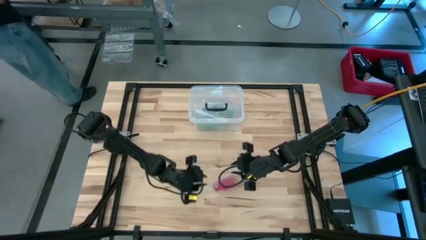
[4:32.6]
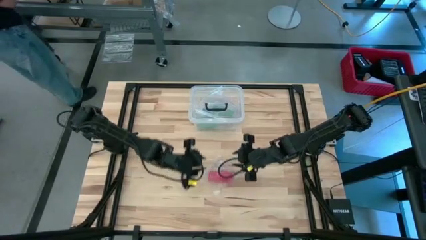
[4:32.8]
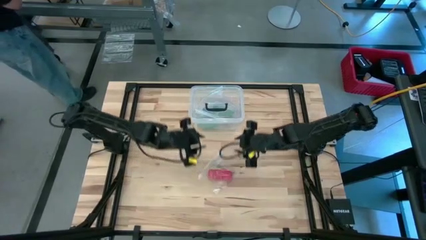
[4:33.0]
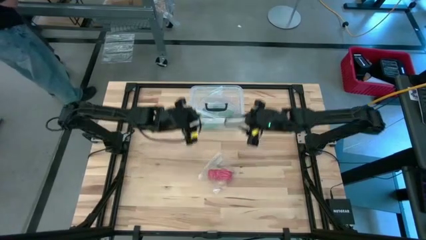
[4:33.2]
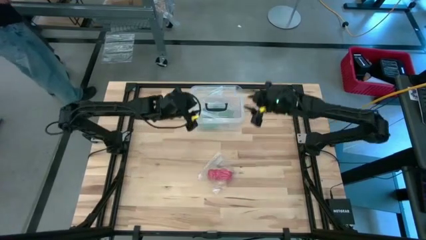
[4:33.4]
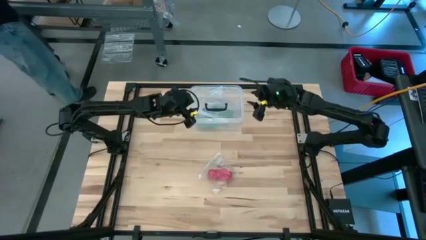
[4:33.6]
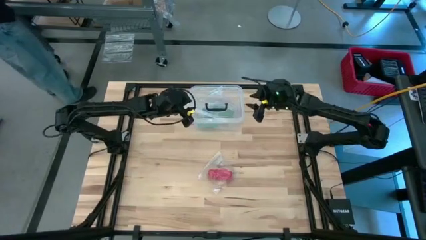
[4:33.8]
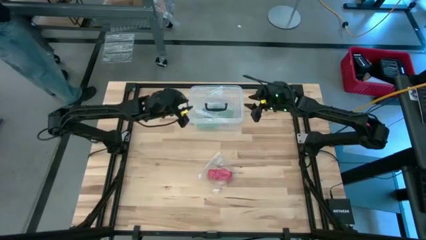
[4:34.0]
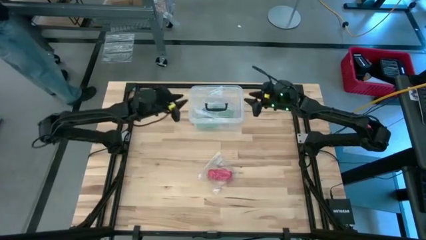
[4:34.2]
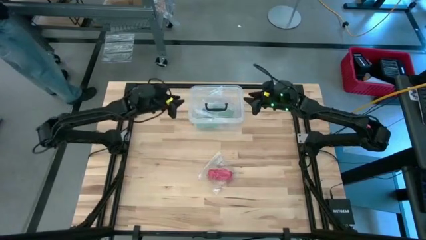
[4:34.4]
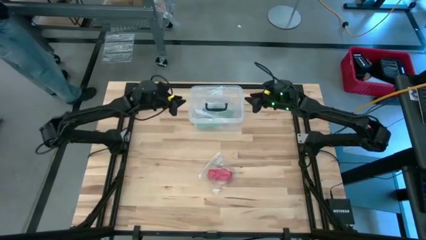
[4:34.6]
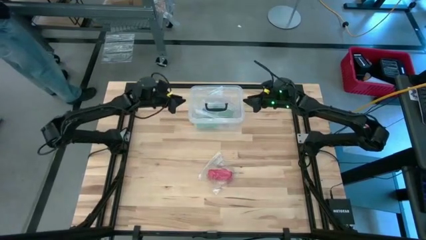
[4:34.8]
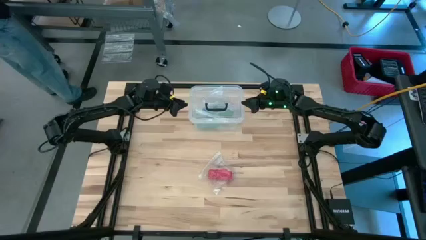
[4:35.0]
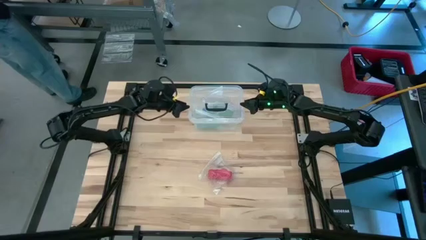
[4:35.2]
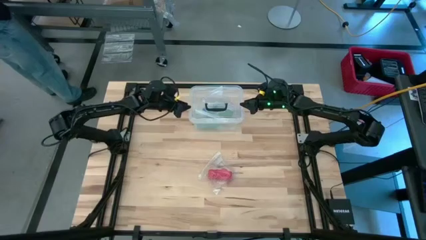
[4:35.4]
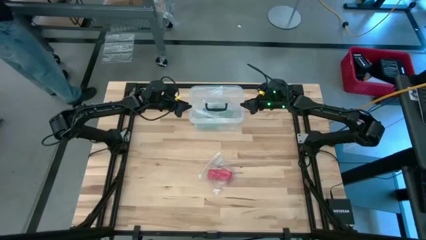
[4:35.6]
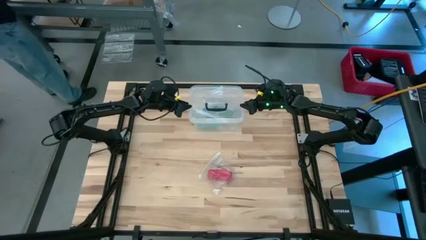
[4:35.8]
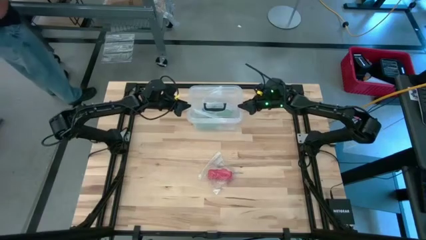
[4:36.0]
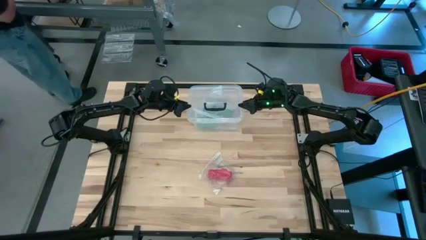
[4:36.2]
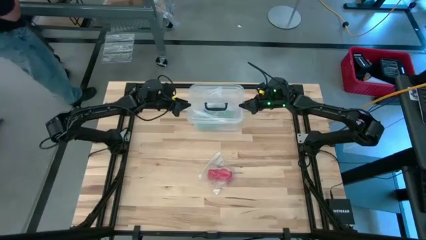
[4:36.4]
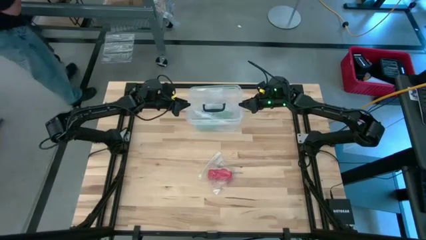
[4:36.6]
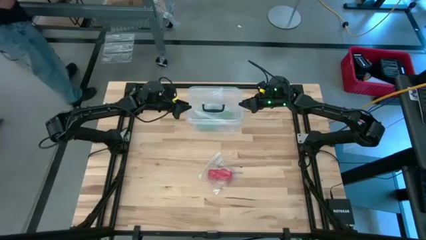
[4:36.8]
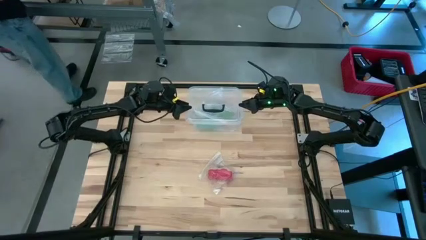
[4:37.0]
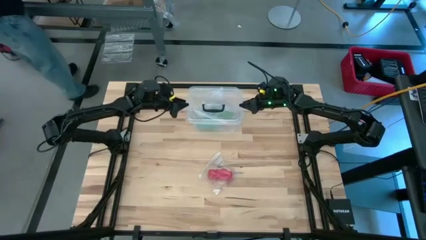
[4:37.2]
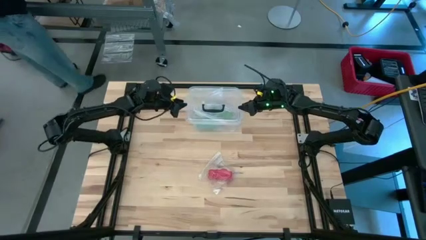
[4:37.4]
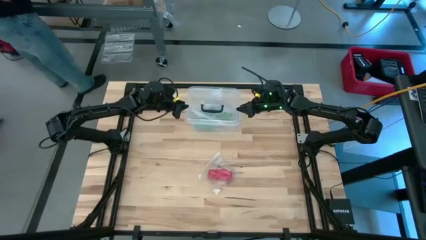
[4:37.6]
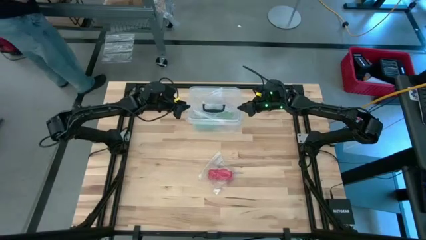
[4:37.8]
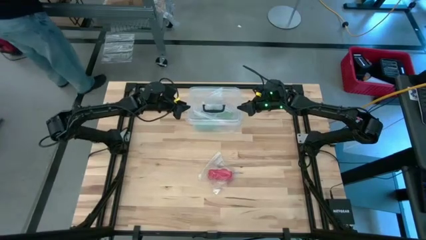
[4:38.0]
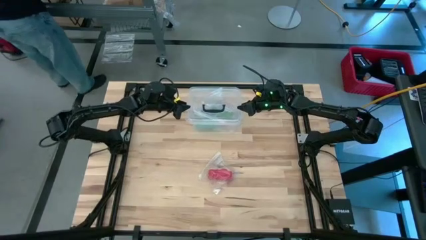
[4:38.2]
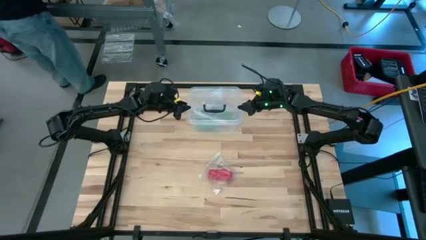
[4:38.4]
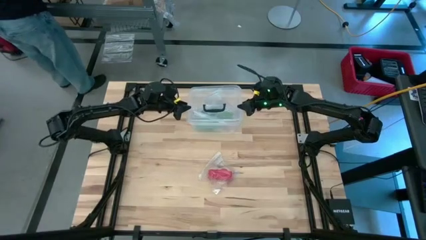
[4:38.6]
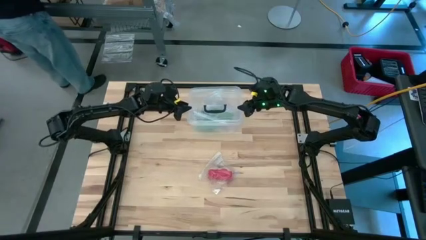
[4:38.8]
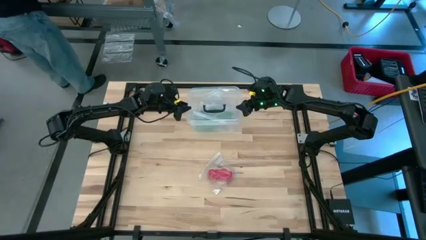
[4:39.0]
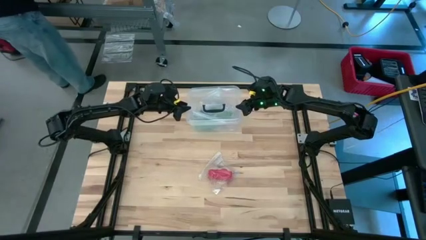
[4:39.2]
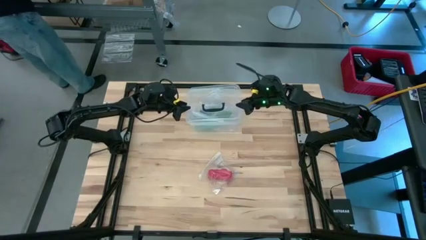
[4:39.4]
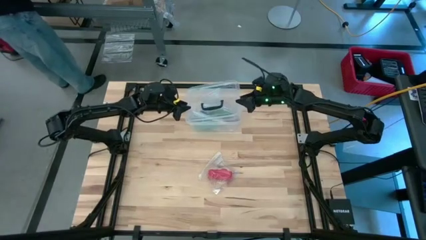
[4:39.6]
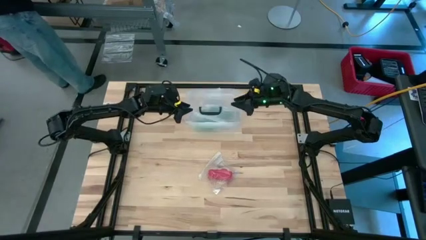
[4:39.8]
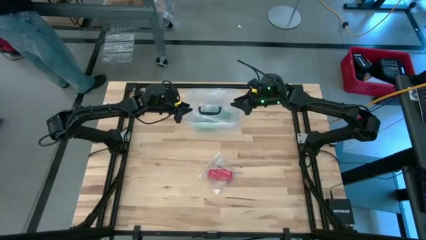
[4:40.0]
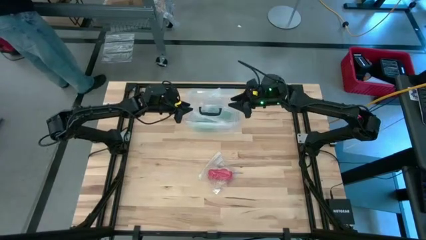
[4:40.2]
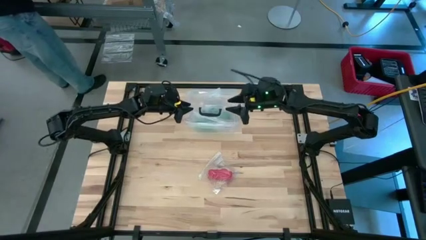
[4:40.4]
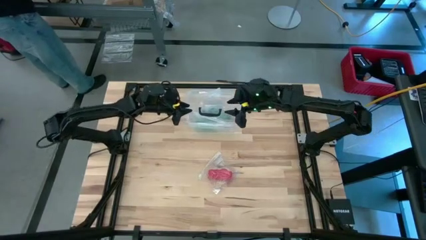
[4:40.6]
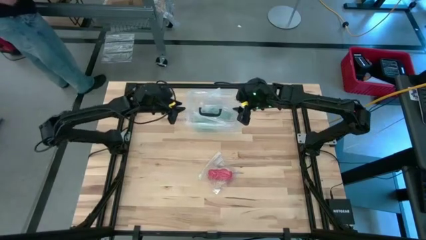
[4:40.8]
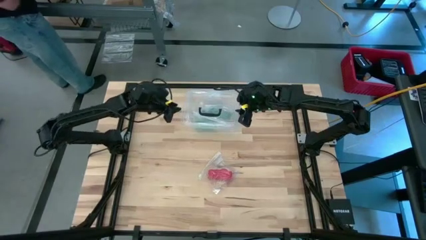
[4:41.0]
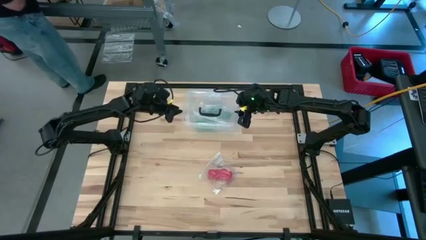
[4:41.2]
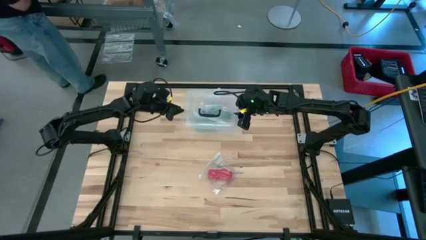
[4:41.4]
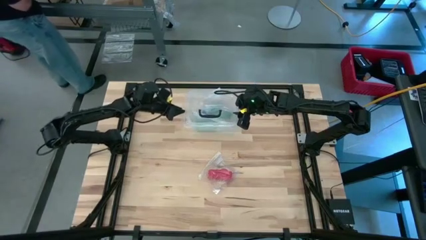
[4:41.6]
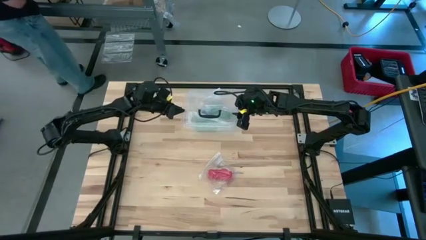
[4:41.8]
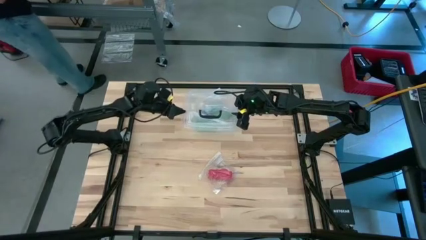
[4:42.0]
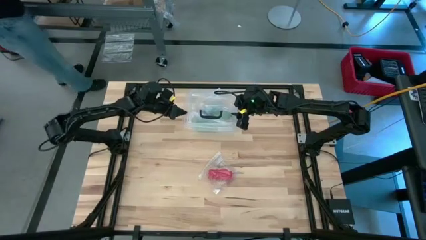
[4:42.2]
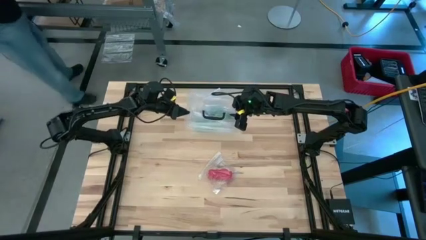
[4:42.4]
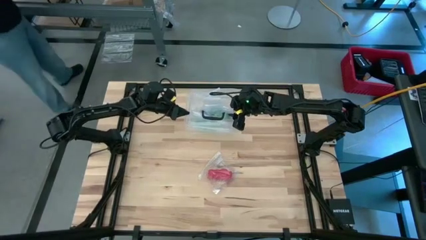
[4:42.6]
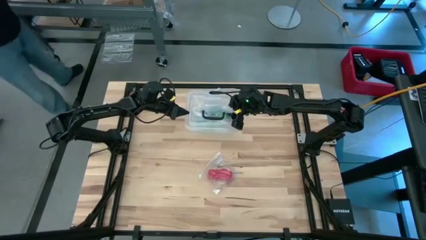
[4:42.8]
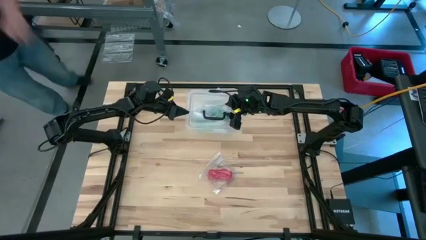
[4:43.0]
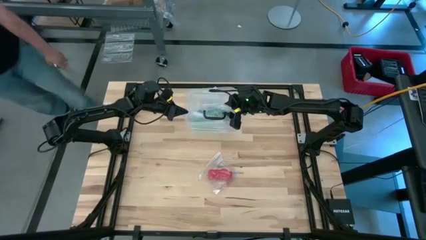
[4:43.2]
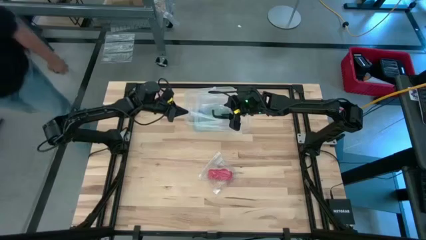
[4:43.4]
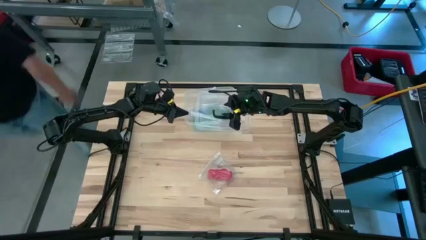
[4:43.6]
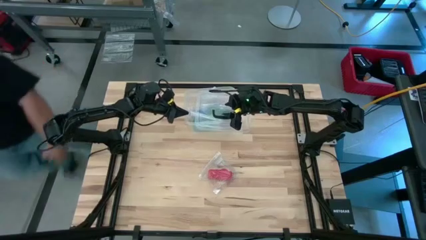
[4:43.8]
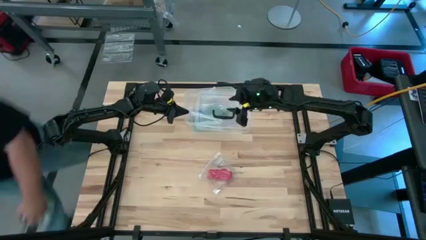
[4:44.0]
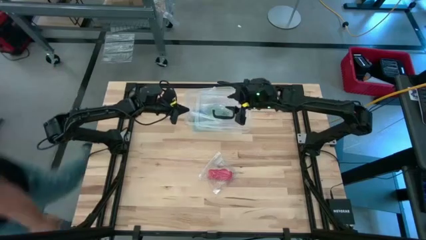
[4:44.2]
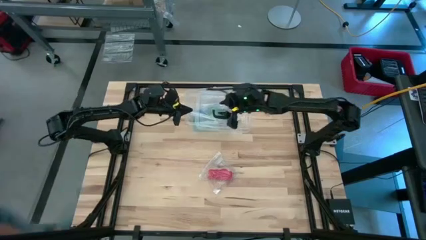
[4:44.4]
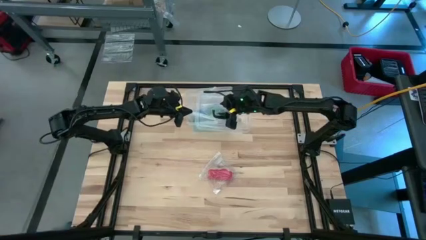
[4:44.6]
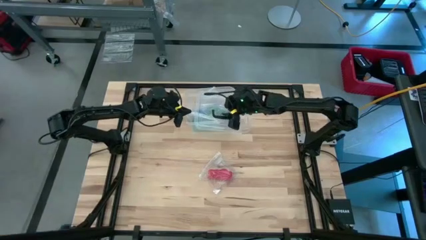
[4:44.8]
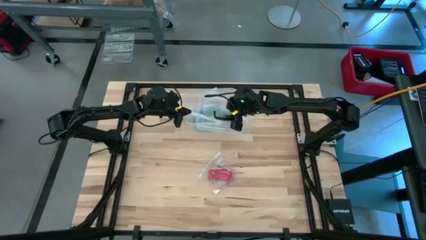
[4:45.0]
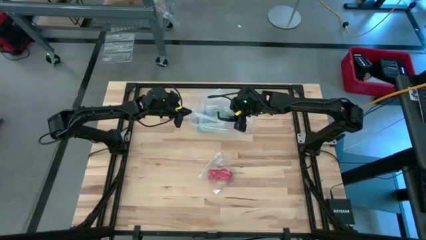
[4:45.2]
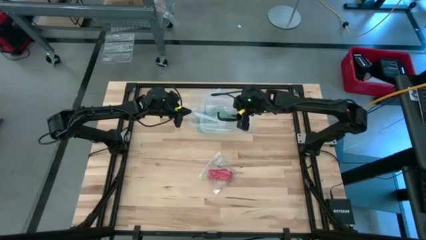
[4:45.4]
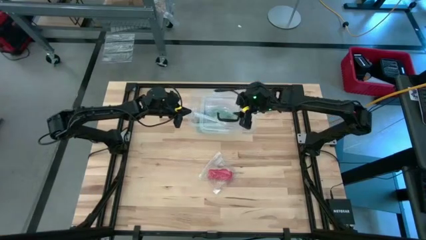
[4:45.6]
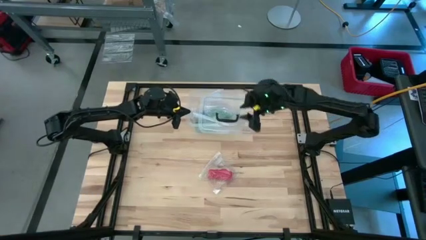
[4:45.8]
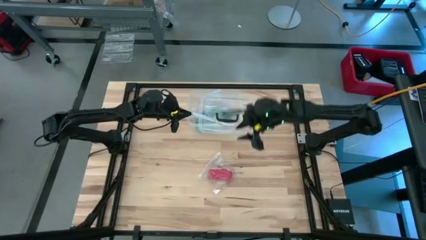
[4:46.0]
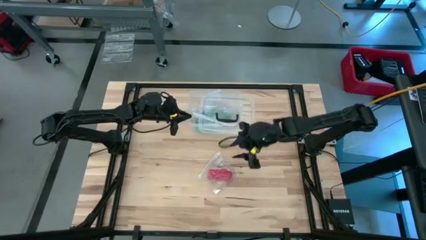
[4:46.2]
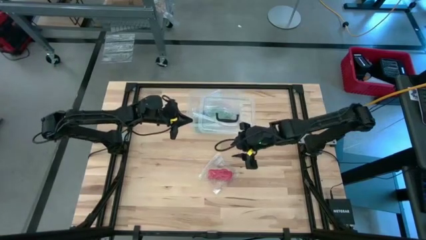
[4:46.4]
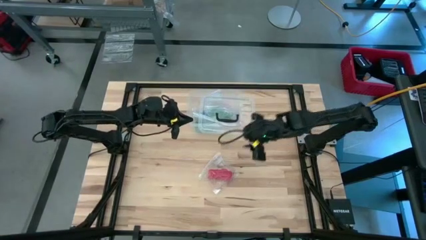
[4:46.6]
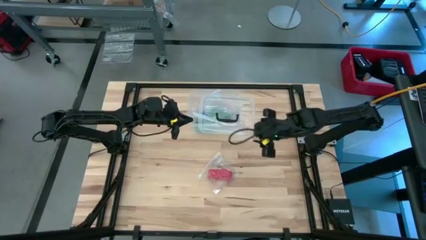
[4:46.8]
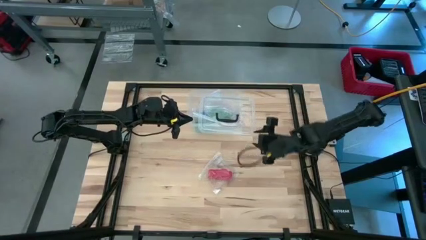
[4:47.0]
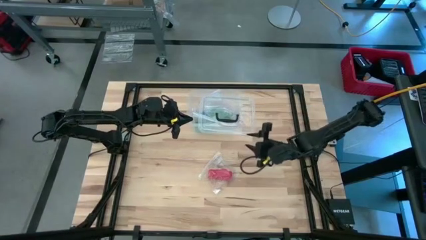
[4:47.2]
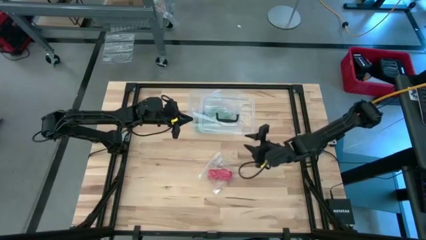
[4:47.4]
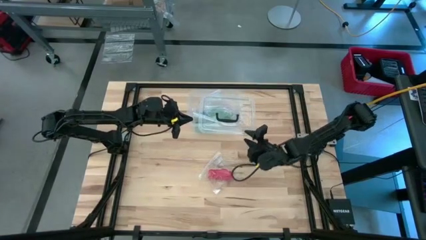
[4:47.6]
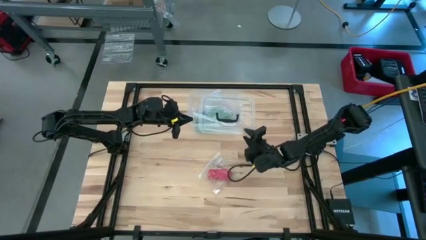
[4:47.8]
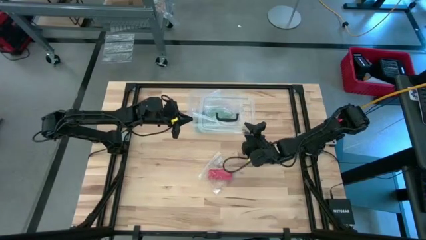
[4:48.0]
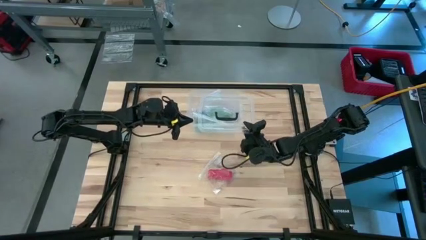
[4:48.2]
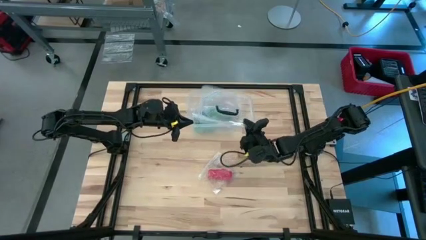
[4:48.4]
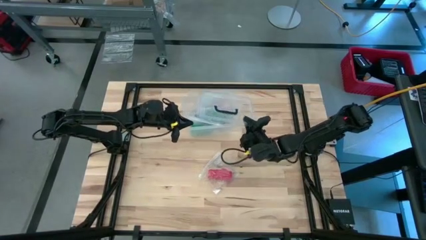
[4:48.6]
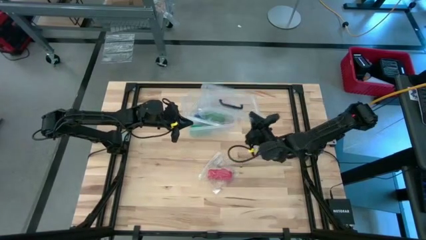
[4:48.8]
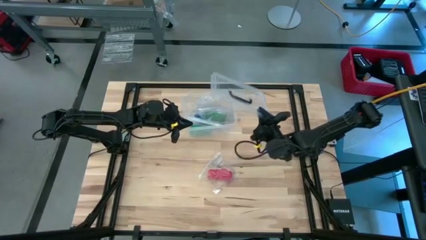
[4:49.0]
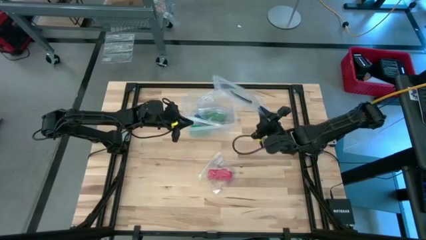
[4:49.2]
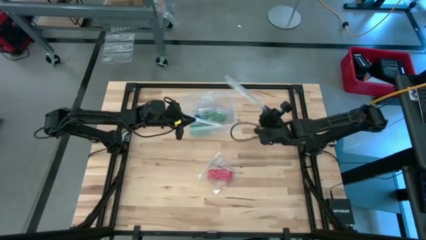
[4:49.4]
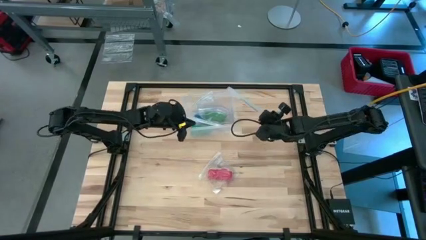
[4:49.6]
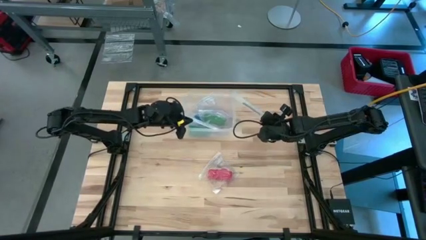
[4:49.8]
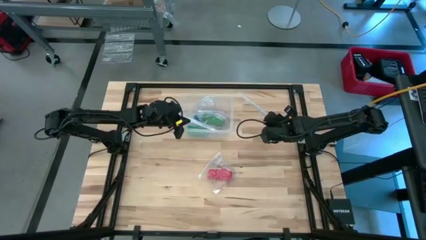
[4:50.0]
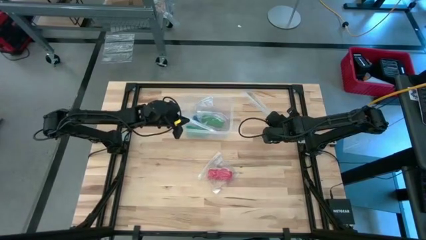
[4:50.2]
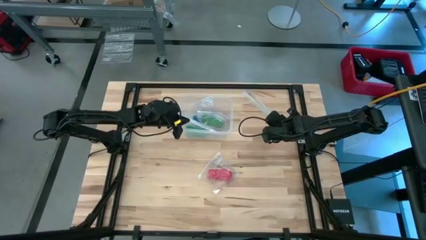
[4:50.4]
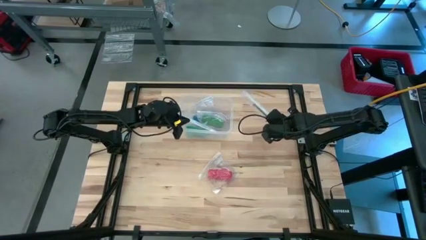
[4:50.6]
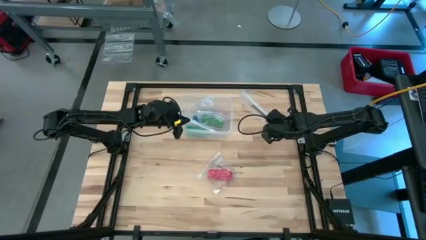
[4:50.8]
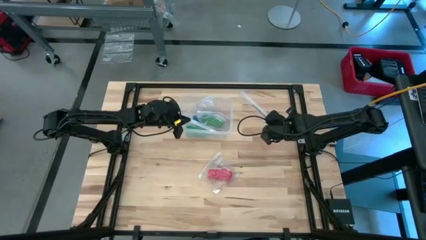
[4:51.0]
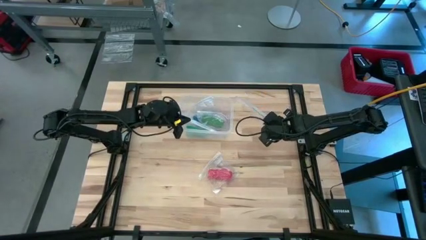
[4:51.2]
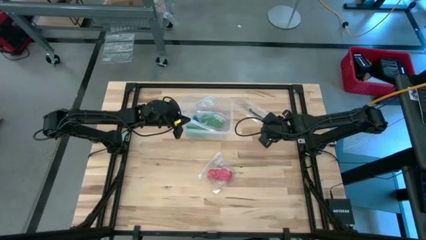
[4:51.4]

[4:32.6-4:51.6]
Task: Roll bandage
Open the transparent container
